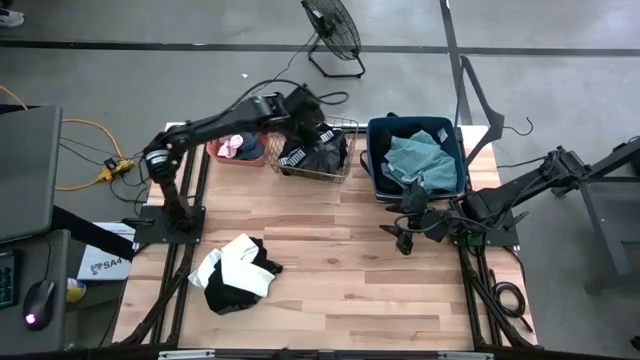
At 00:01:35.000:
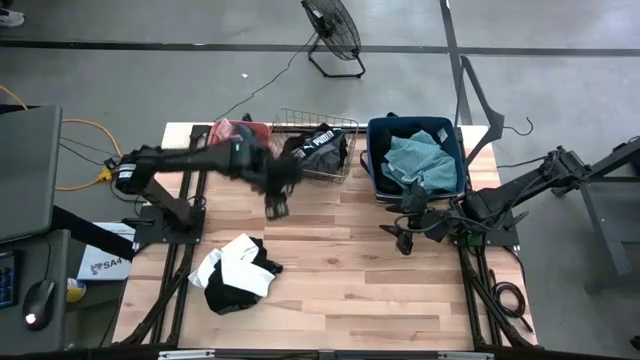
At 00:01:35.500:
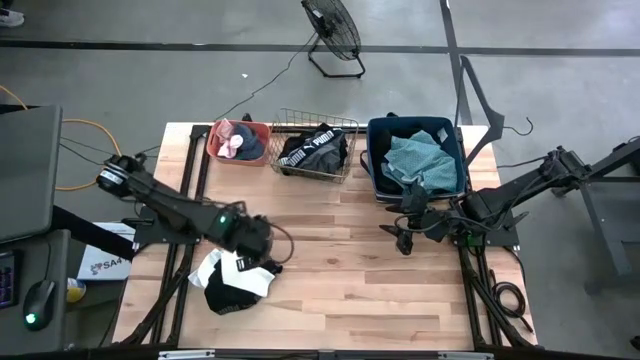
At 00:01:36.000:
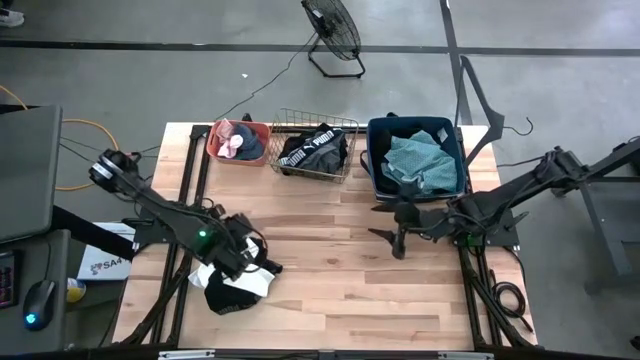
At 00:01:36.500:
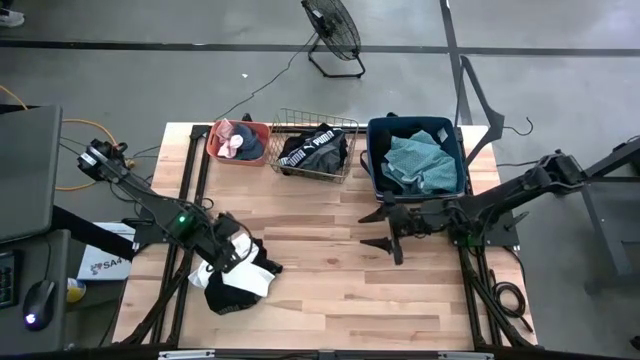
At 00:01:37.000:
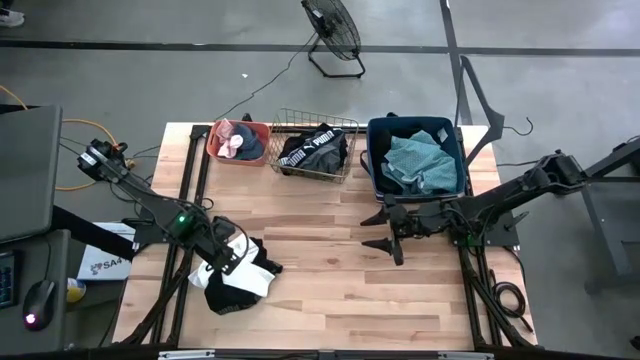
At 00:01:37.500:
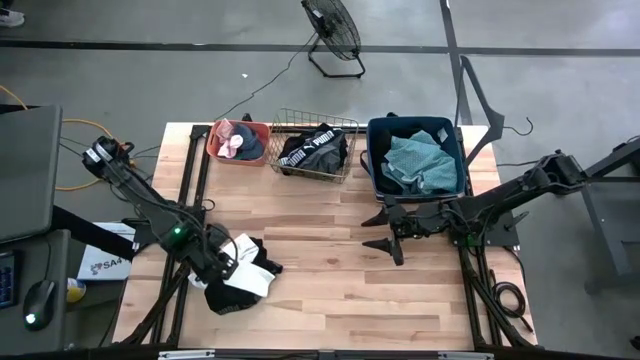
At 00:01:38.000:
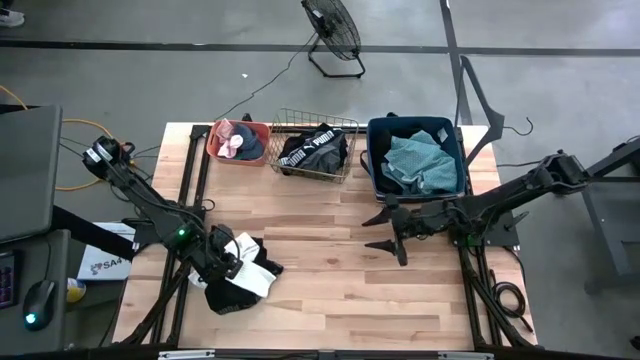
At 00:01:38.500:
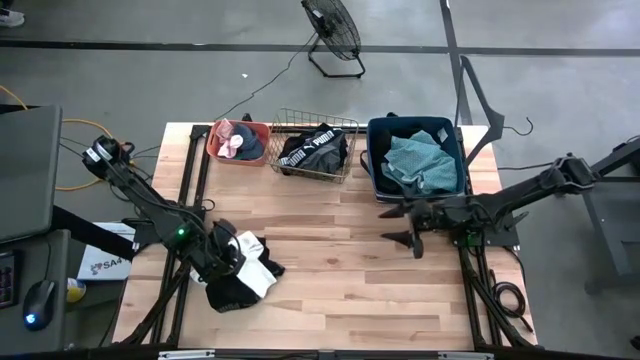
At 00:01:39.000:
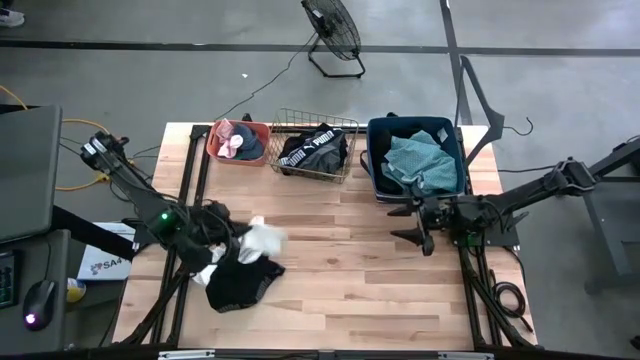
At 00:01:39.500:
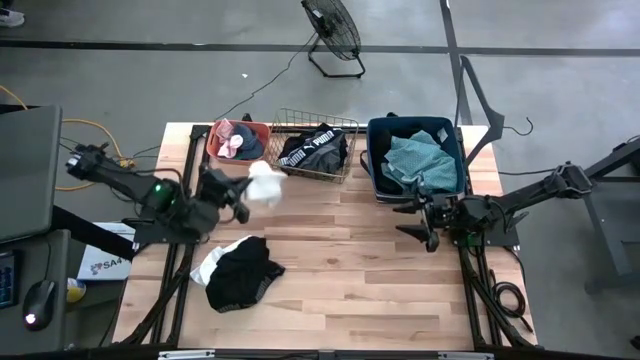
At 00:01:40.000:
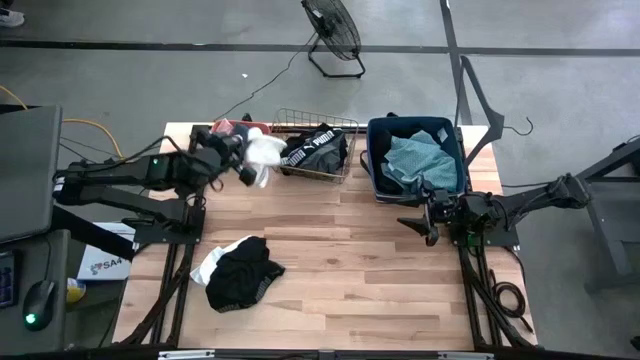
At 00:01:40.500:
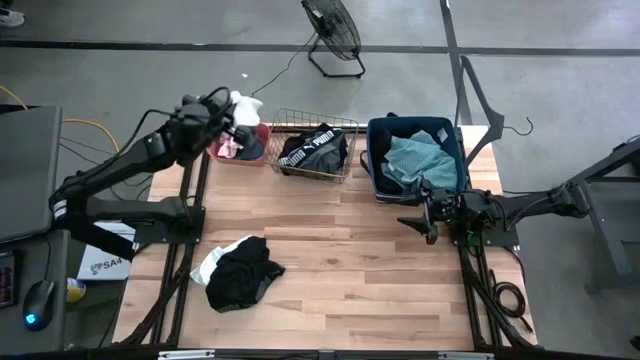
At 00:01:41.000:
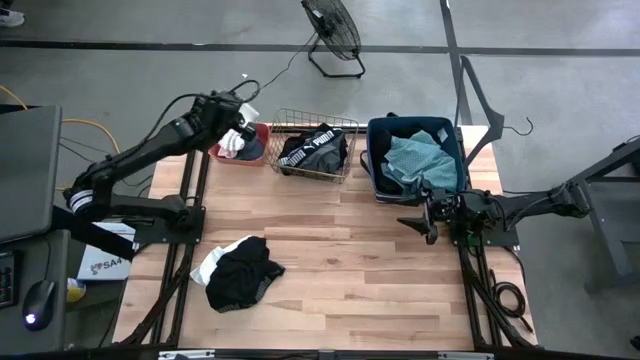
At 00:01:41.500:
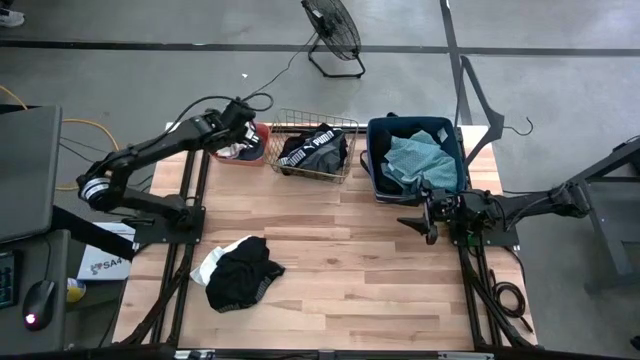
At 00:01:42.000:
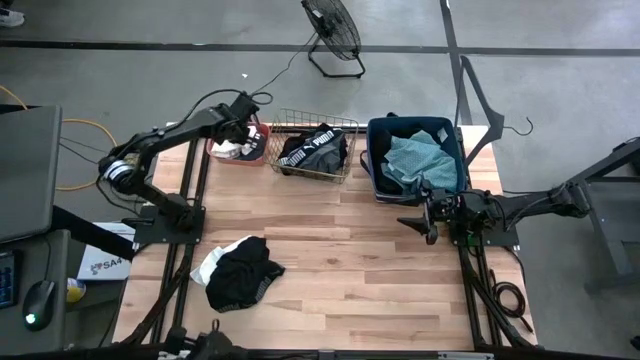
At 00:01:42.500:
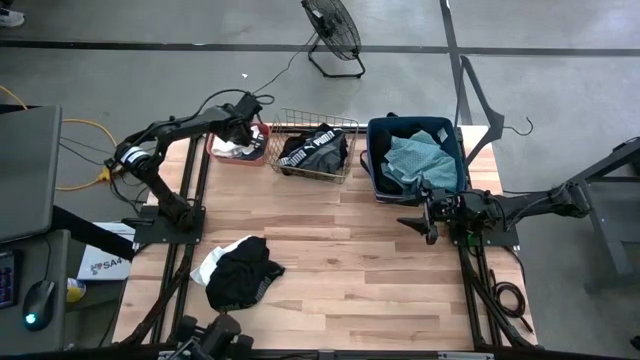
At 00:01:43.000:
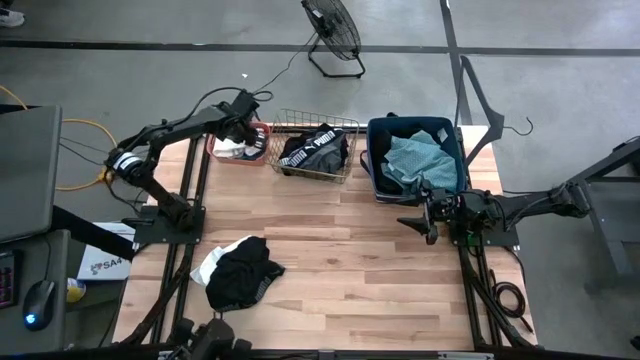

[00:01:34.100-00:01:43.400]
Task: Pick & Place Cloths
Put the white sock into the orange bin

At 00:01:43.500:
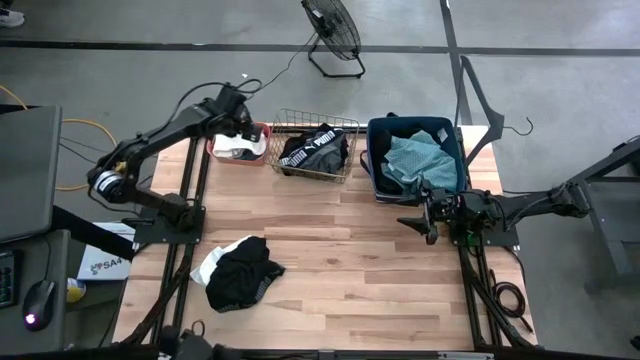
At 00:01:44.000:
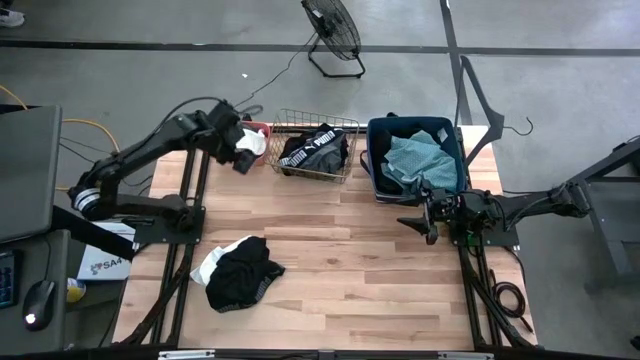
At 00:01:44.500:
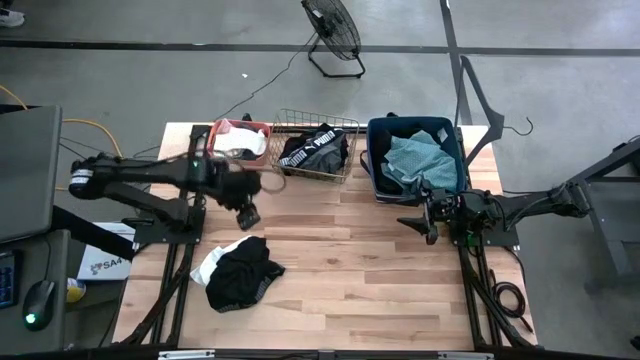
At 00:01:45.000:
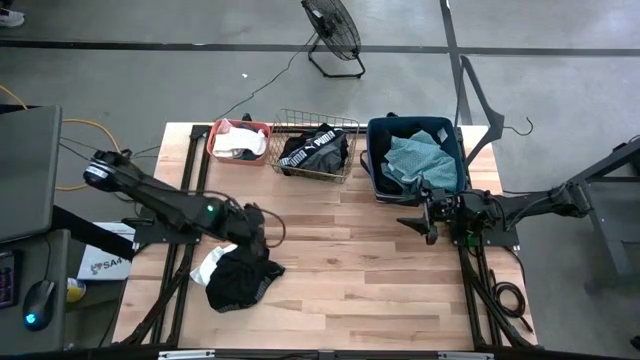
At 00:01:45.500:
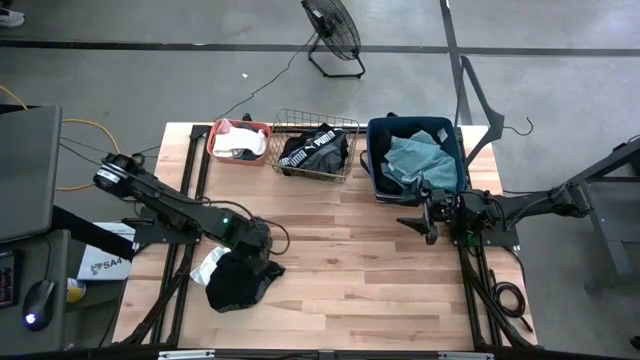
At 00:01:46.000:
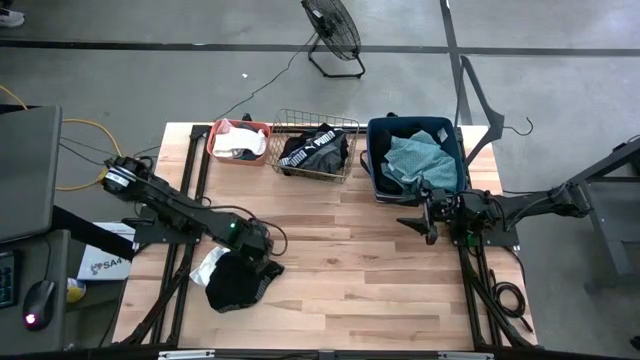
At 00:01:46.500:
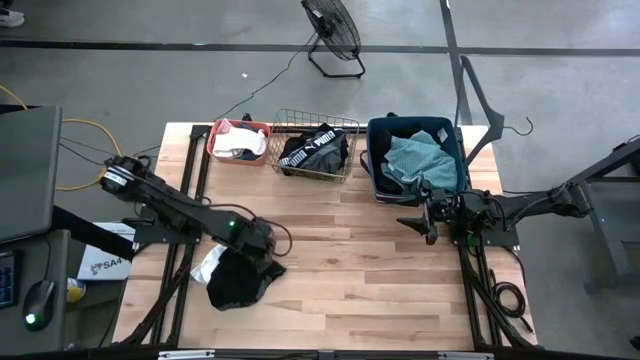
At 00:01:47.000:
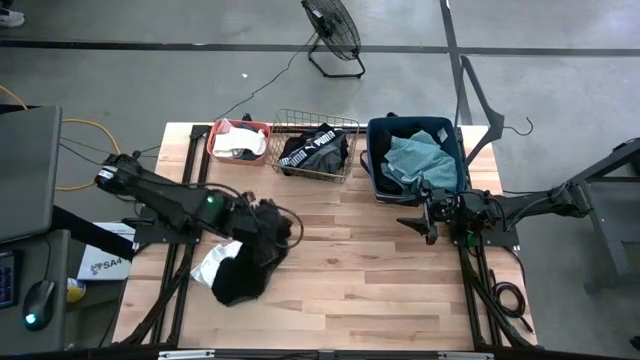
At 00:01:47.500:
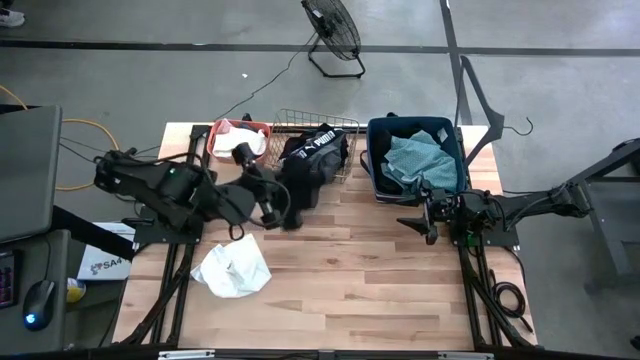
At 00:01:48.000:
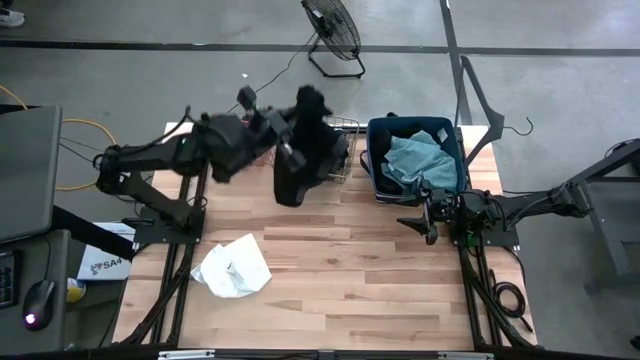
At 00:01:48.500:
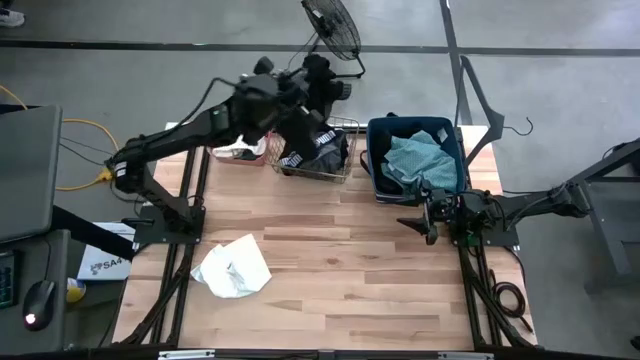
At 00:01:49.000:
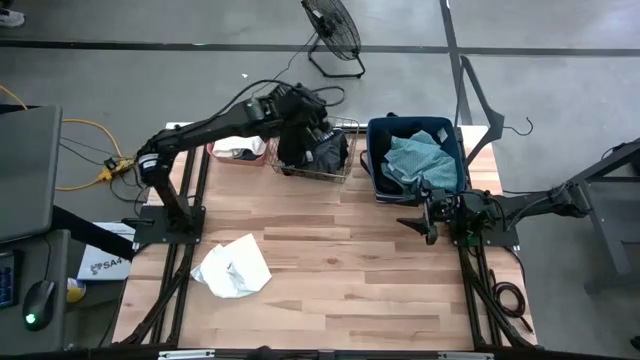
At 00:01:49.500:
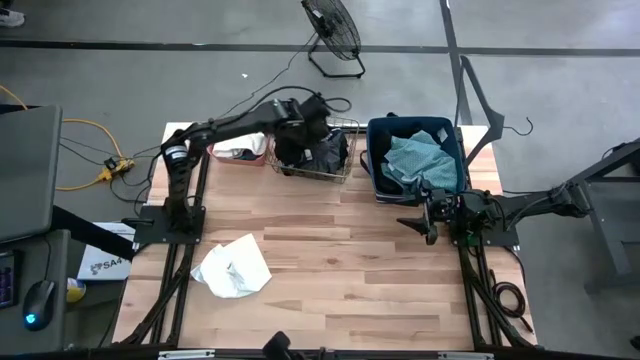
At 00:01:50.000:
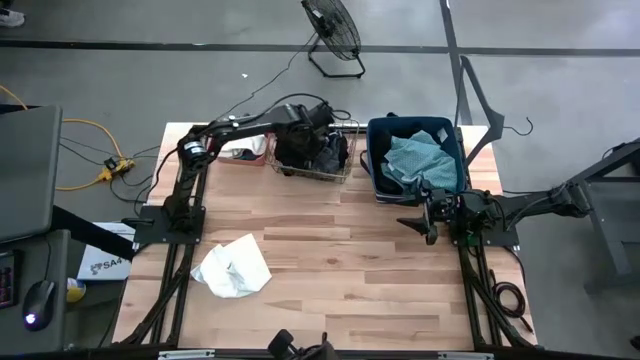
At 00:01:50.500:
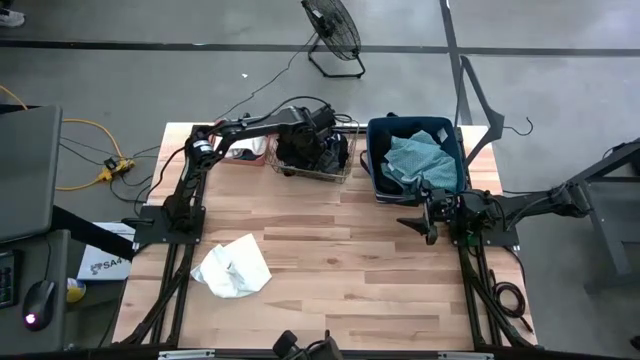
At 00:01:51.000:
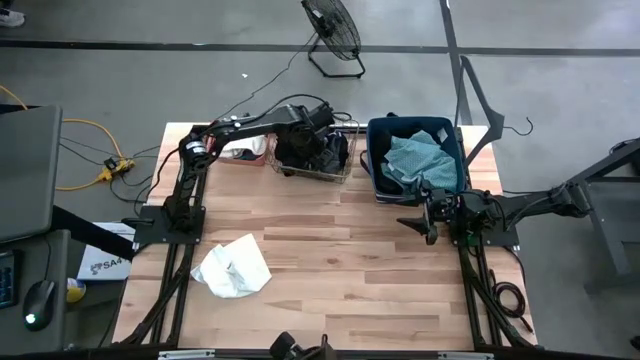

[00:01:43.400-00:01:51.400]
Put the black boxer into the gold wire basket

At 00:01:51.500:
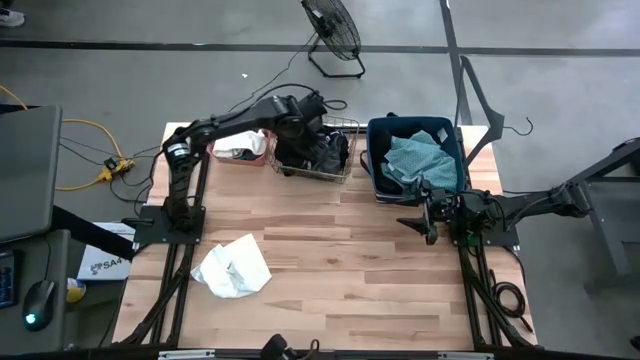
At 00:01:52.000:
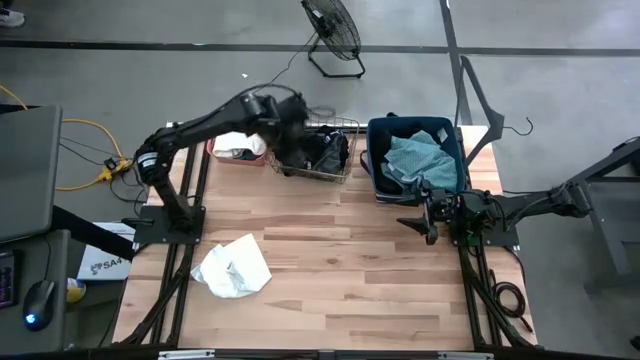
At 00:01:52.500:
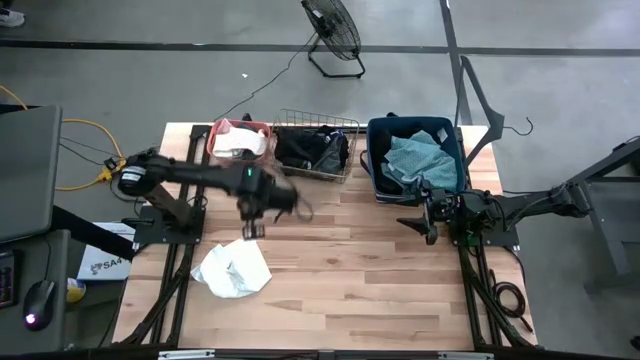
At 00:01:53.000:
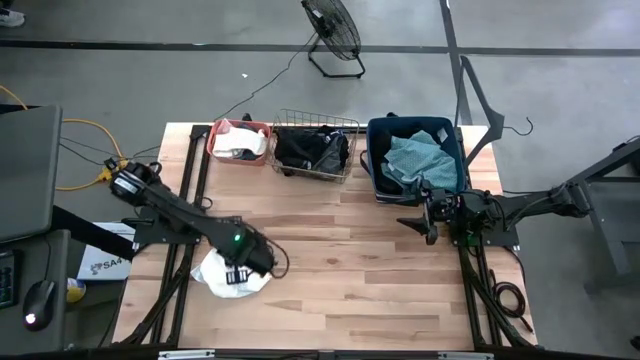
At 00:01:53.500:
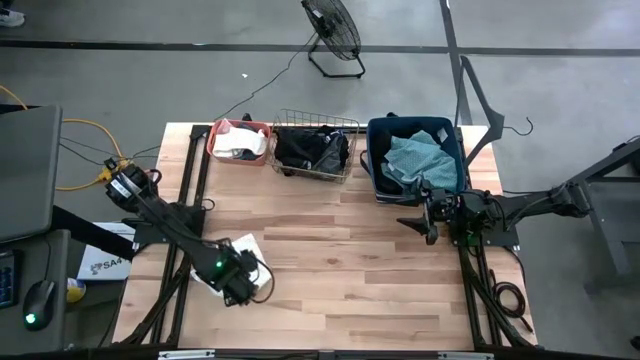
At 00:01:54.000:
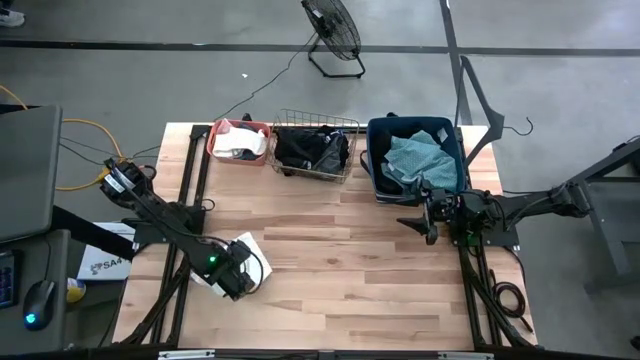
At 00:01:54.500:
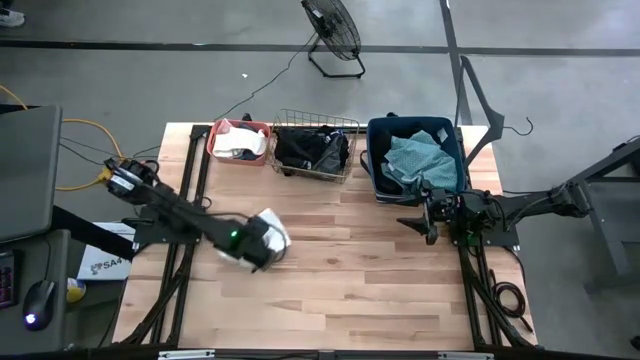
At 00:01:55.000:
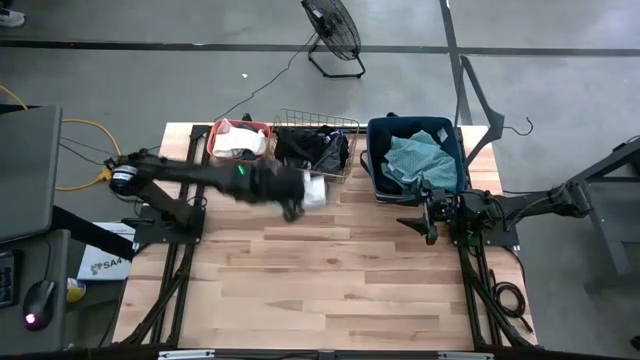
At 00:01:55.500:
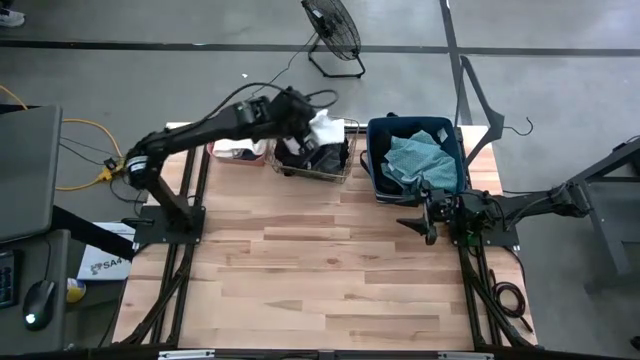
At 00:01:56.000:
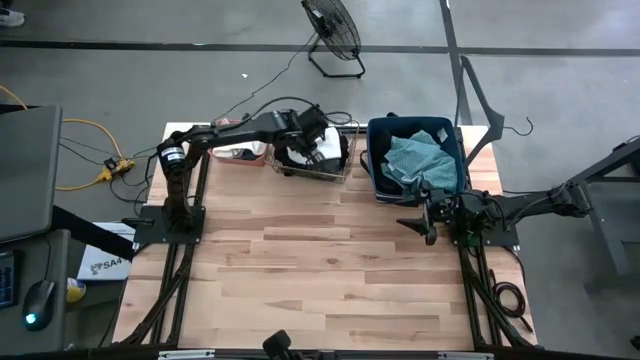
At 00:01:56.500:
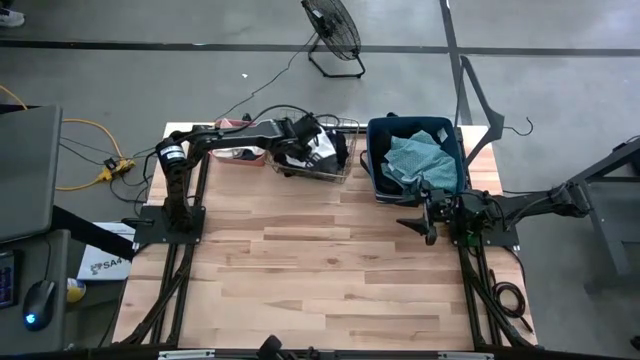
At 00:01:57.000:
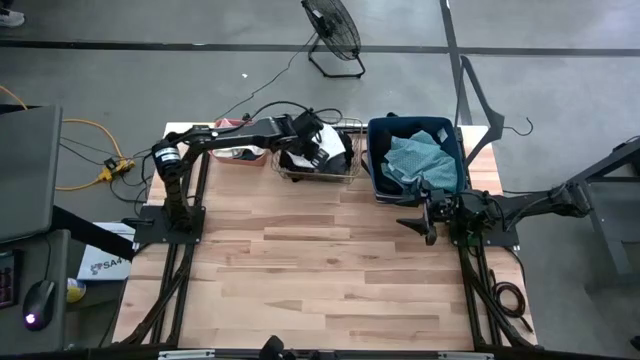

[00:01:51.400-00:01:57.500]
Put the white boxer into the gold wire basket
